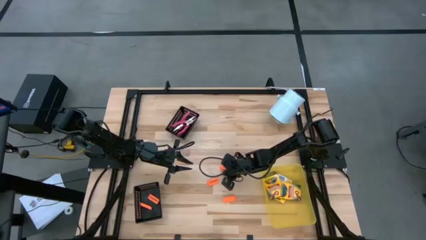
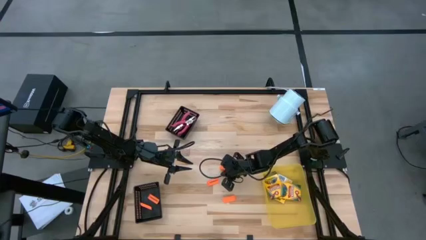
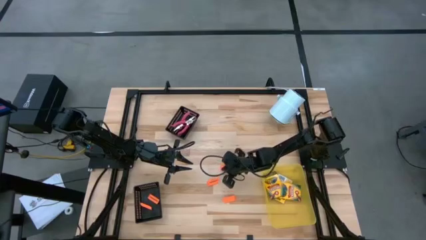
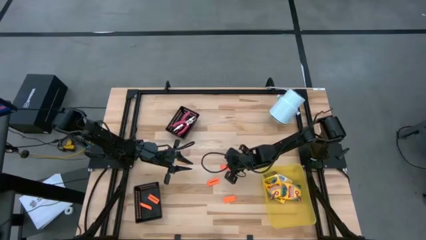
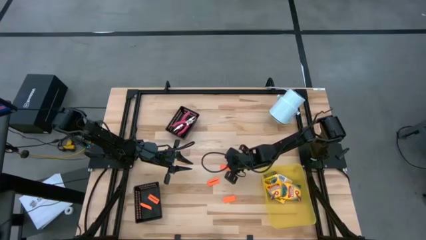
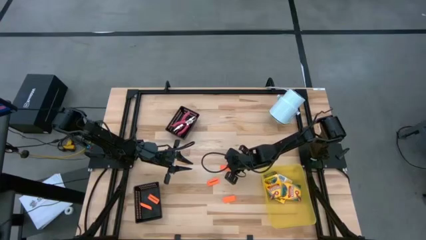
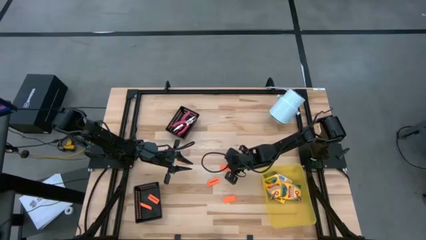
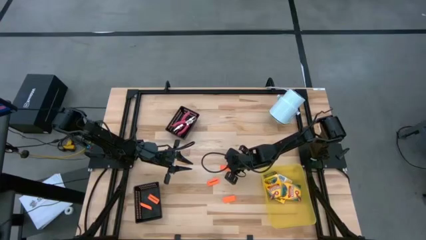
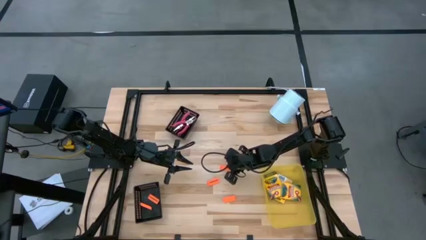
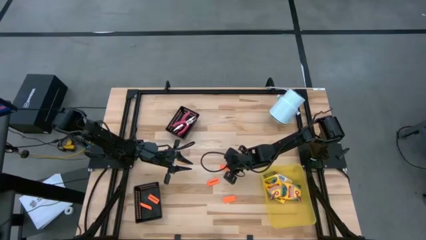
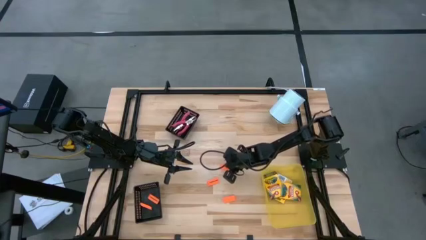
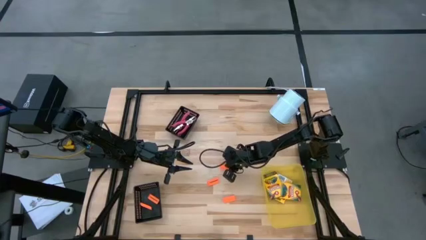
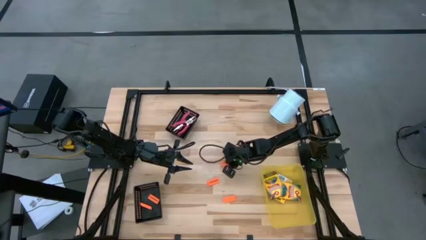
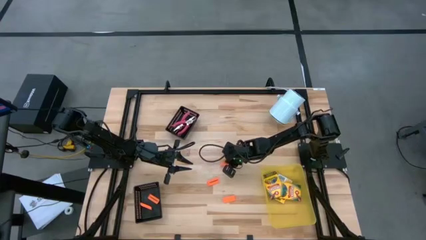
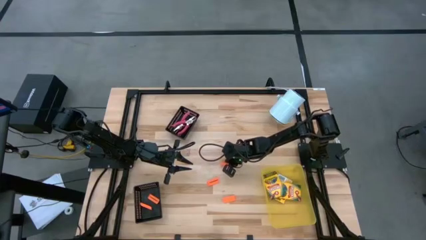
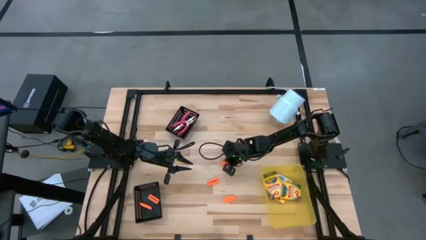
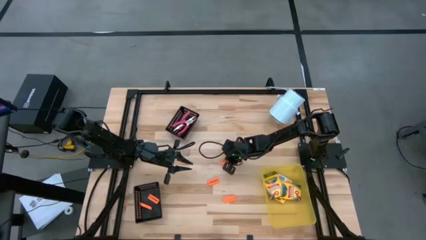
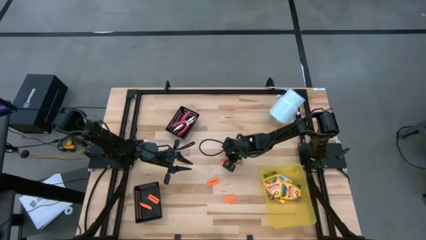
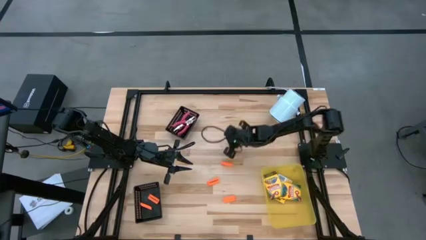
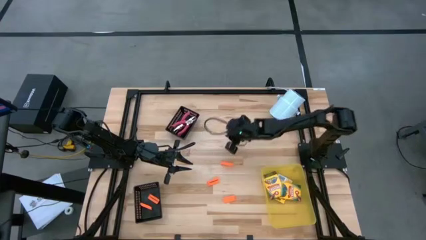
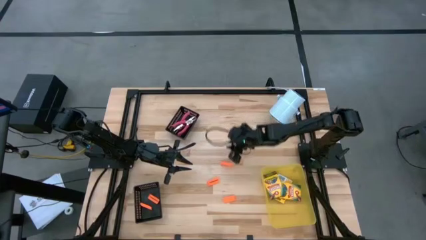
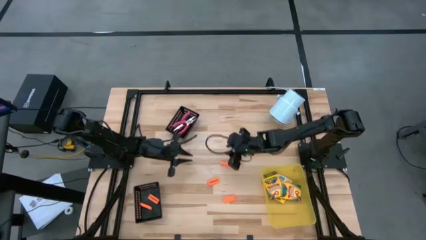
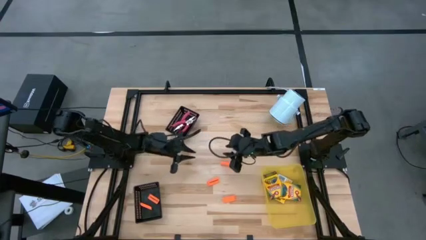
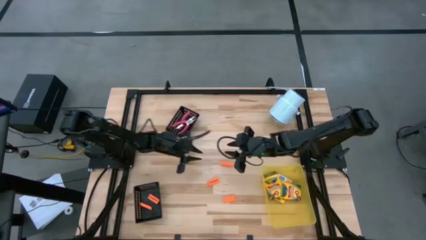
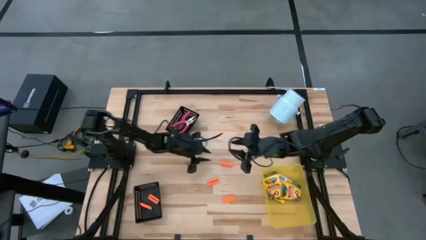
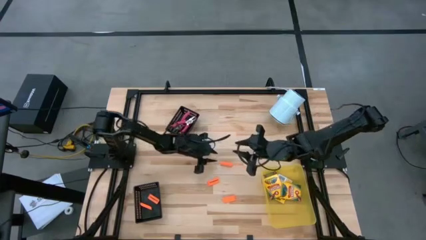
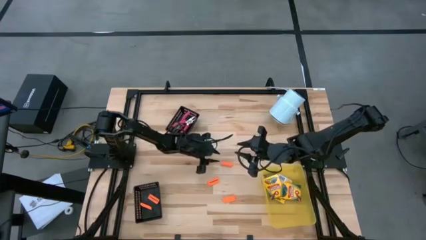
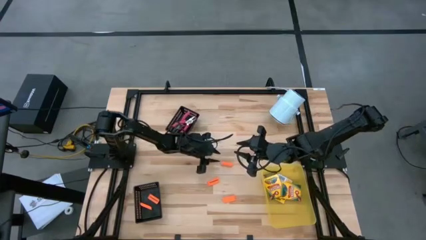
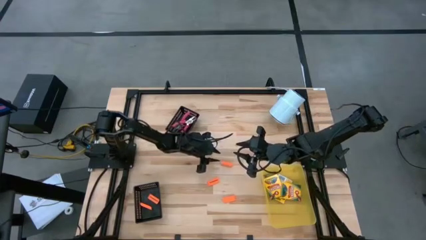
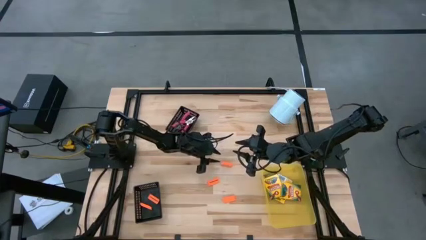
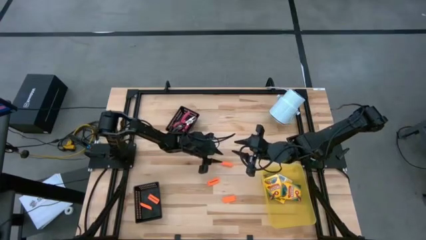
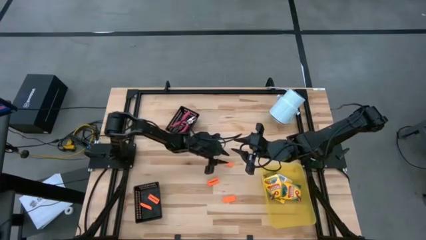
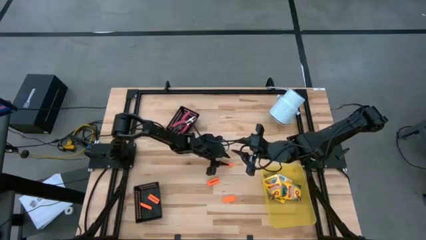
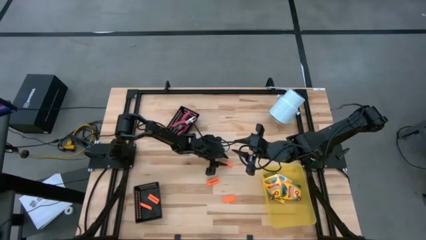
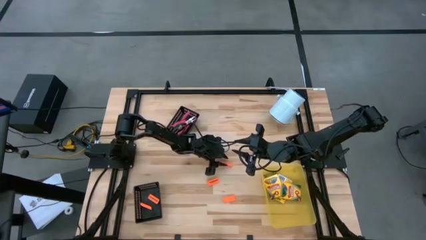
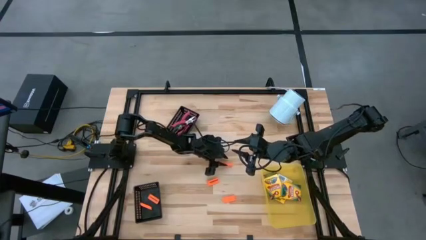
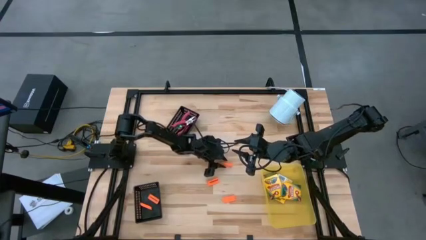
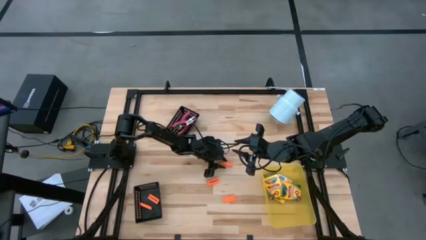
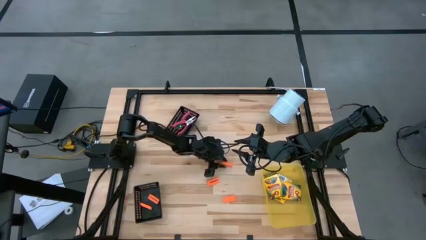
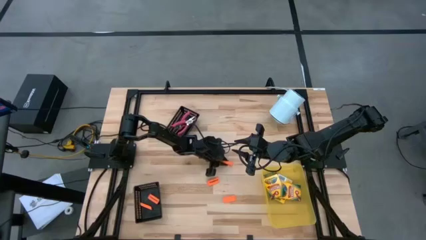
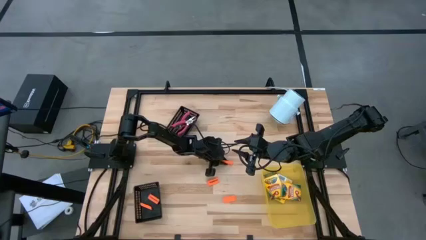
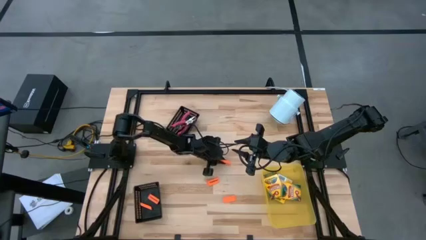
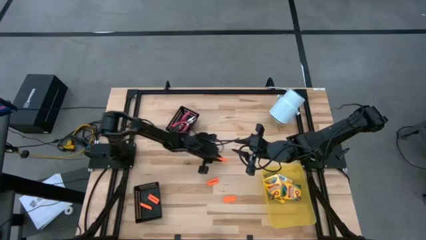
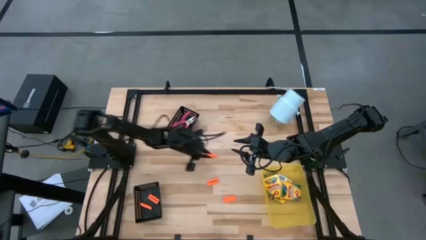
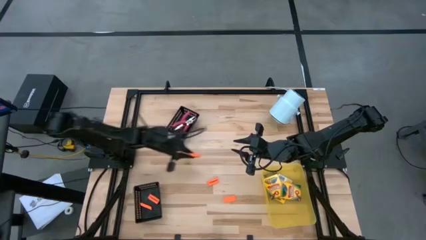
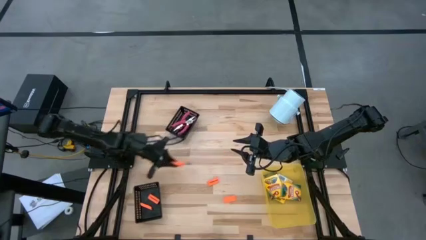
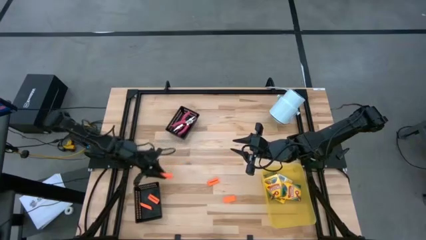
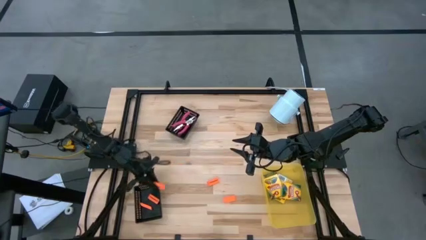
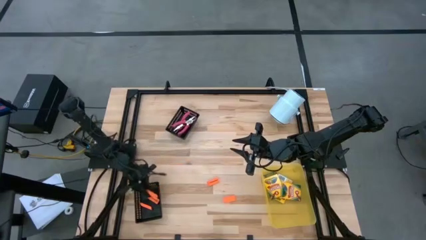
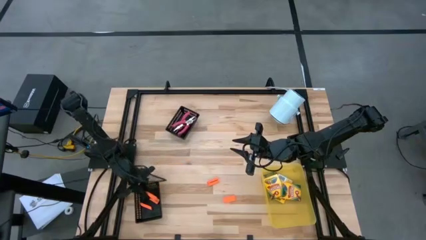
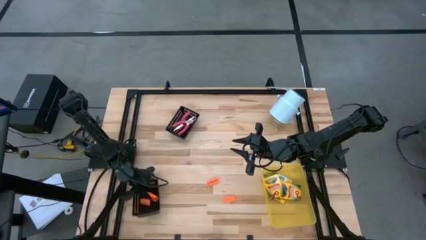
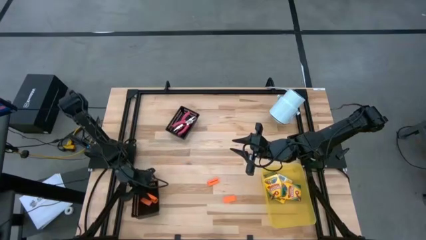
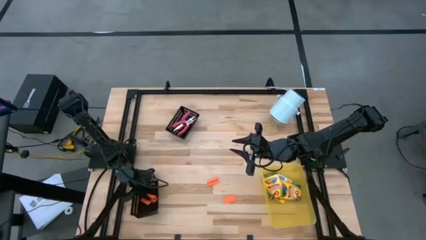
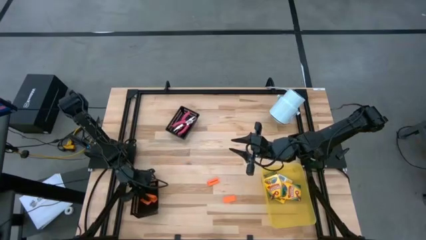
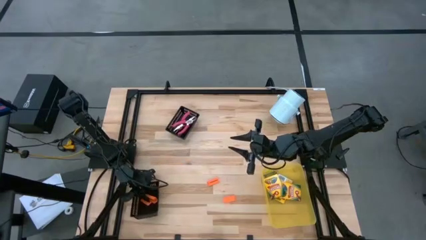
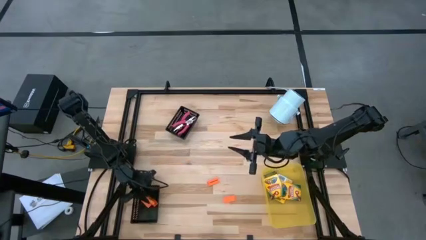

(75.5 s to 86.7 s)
Task: Pick & Place School Supplies
Put the orange eraser into the bottom black basket

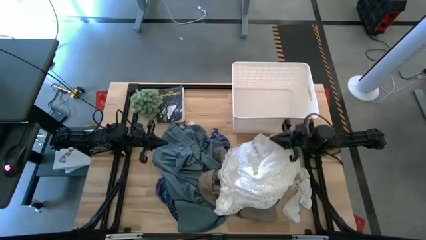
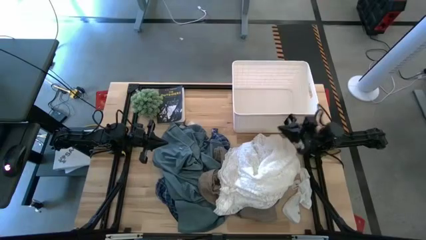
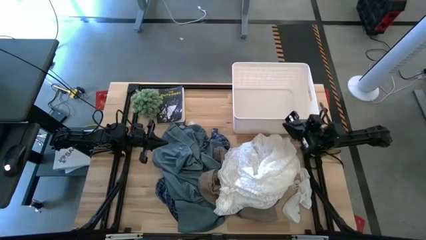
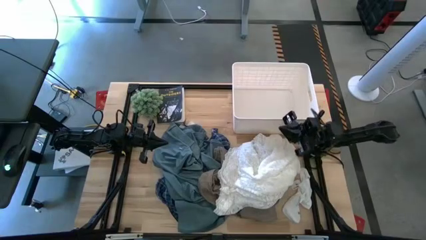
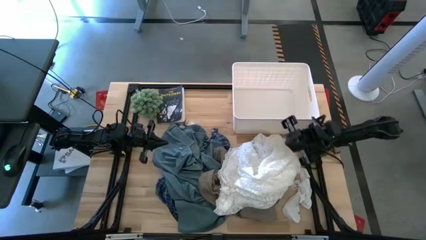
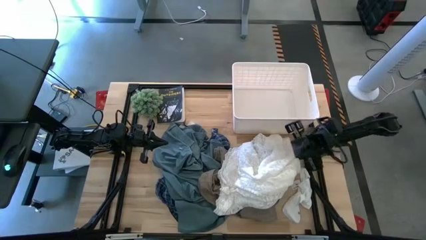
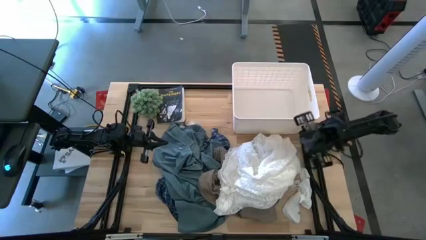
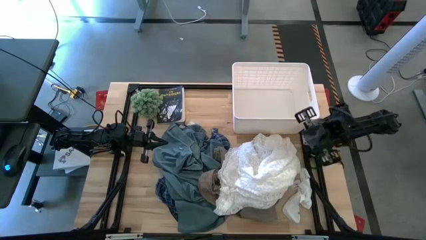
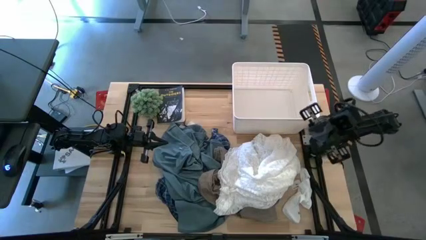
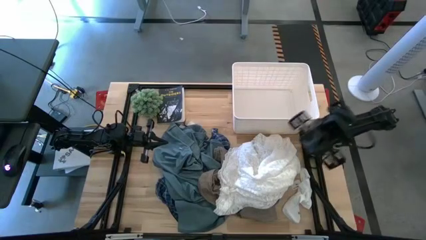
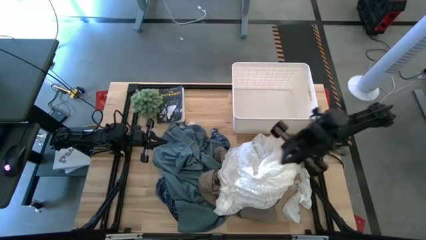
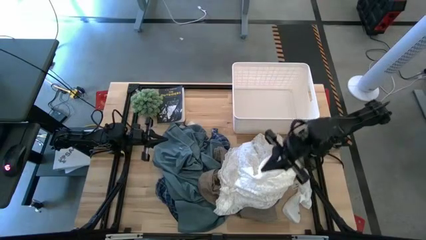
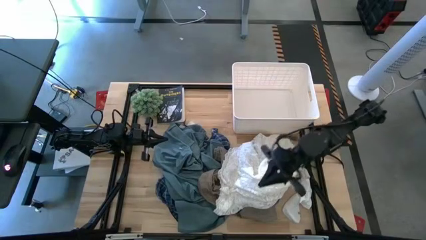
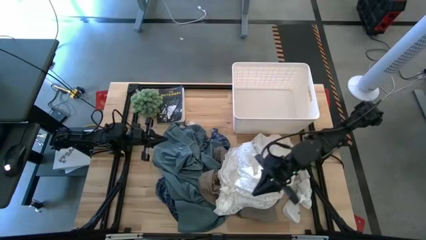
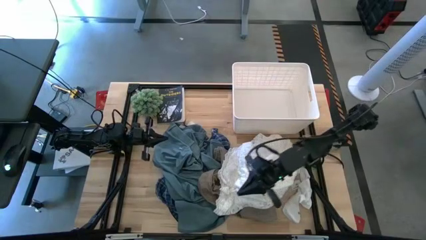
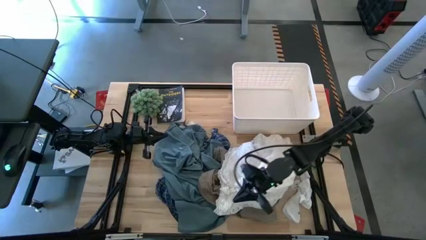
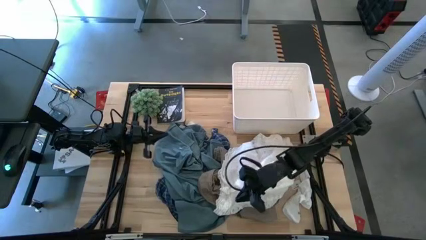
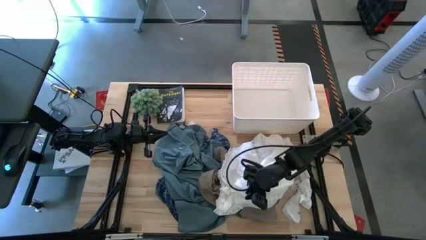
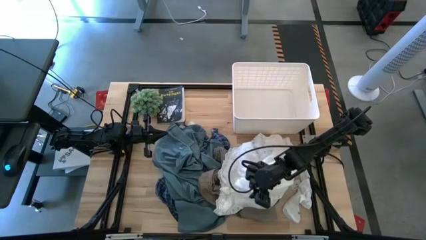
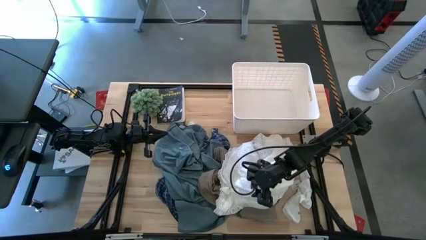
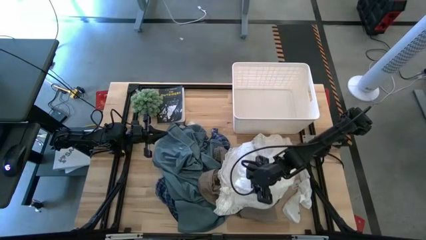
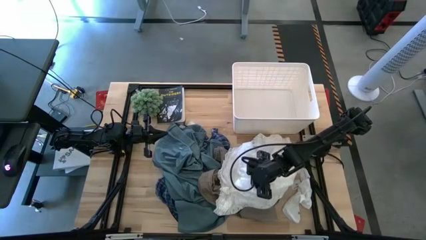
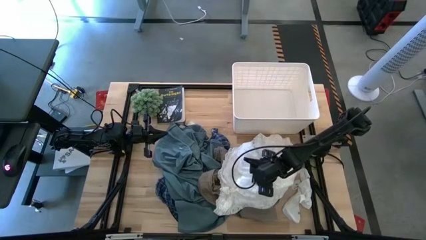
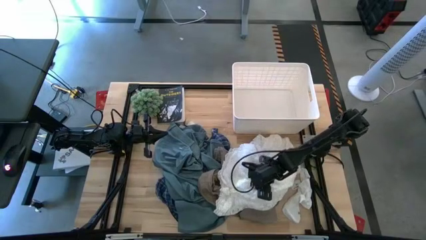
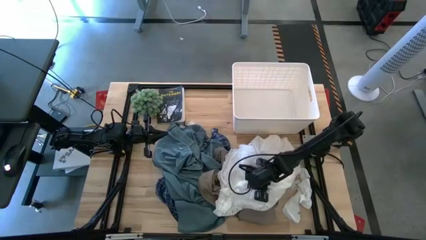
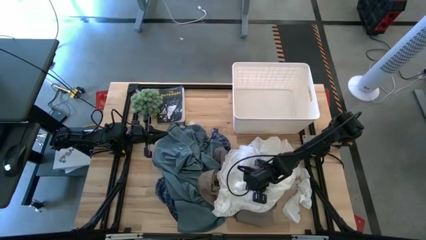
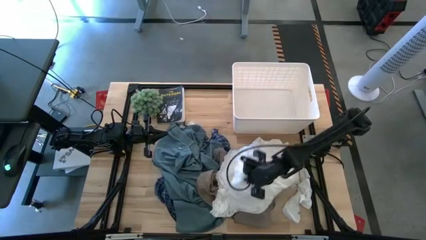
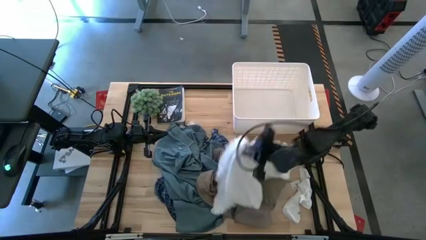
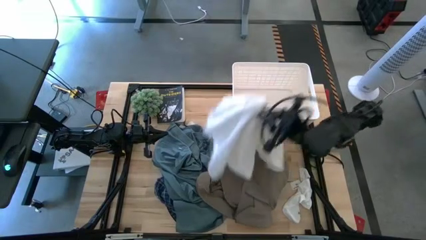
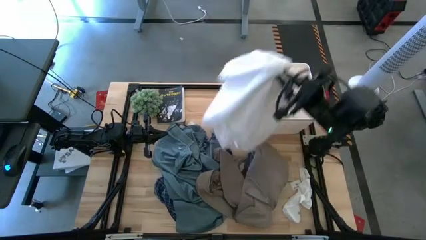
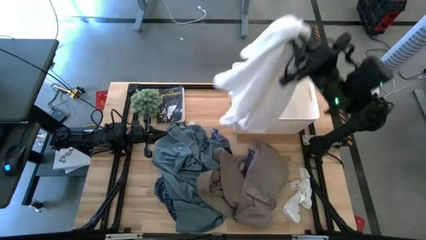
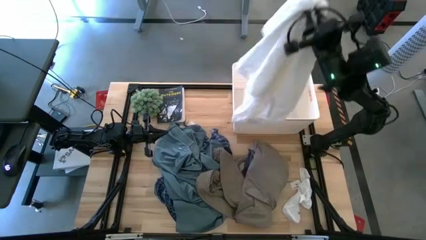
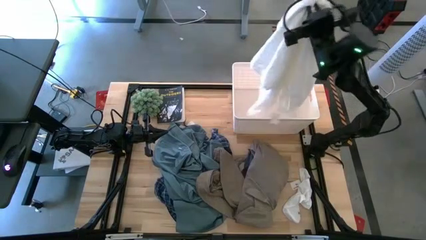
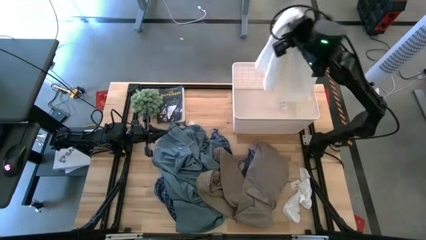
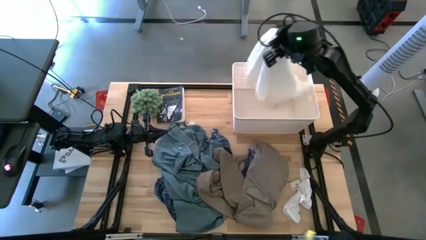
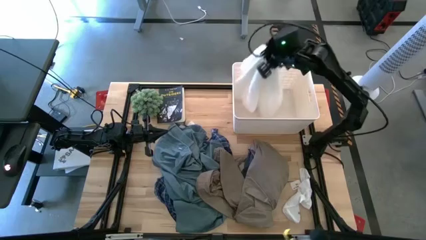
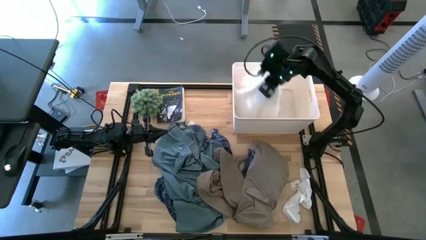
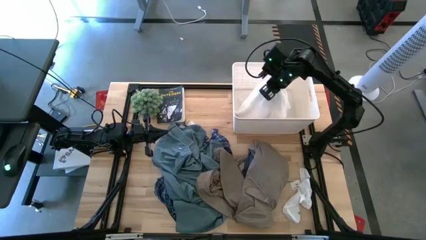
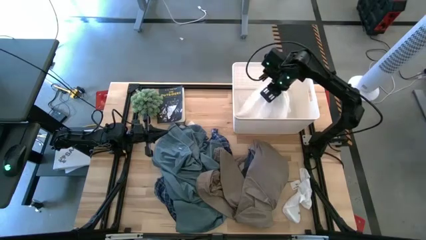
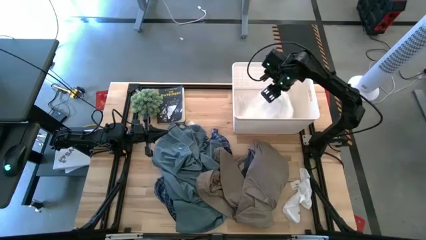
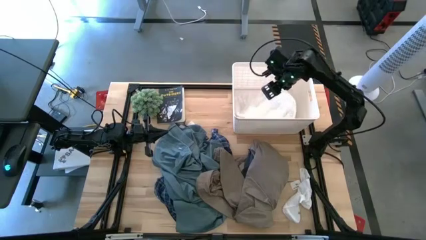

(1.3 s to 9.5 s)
Task: Sort clothes
Put the white dress into the white laundry organizer
